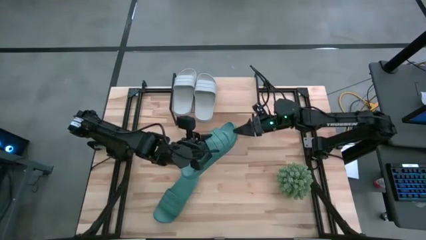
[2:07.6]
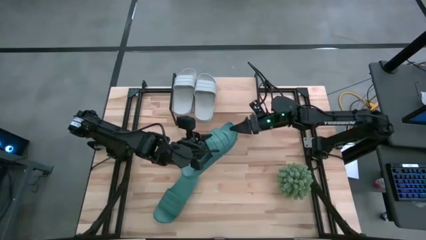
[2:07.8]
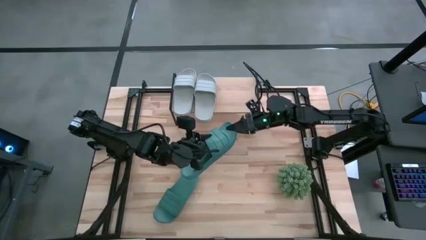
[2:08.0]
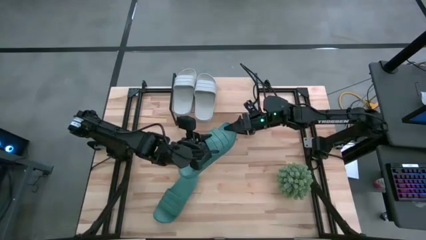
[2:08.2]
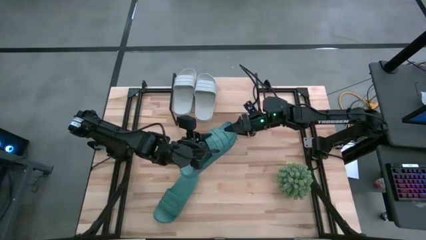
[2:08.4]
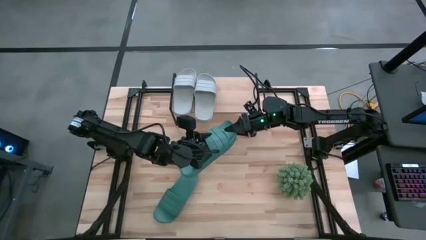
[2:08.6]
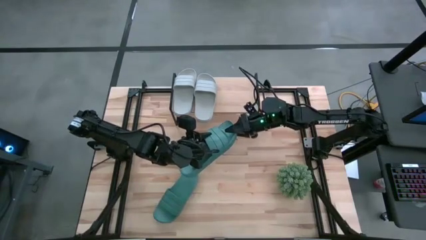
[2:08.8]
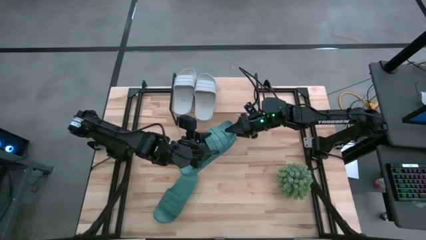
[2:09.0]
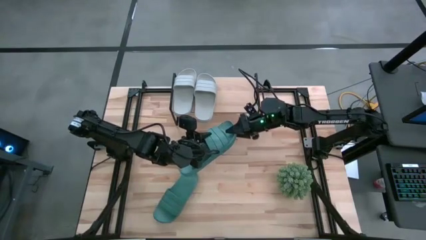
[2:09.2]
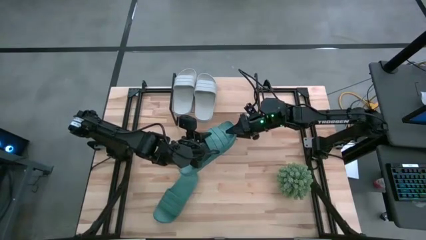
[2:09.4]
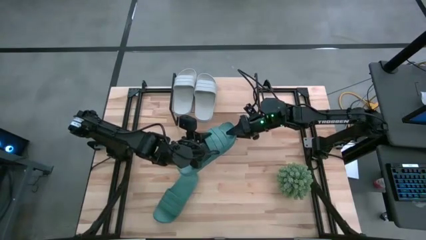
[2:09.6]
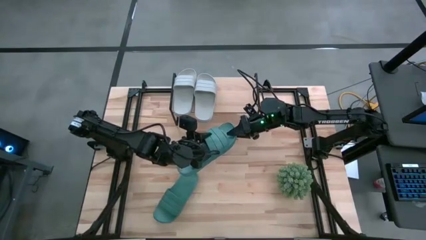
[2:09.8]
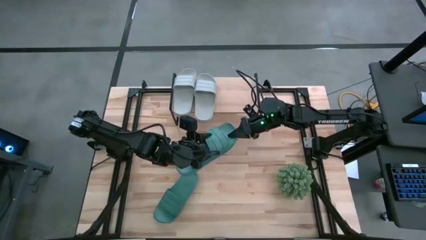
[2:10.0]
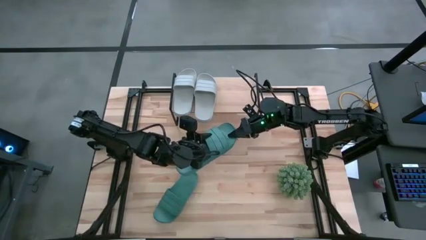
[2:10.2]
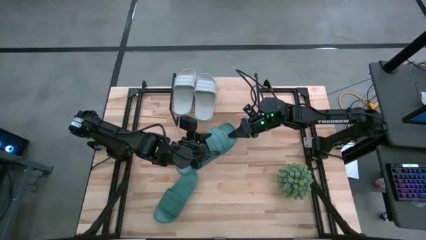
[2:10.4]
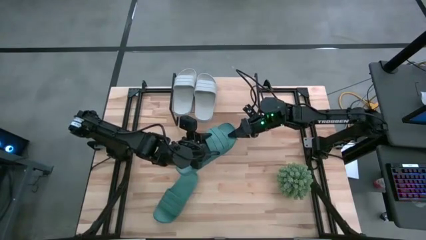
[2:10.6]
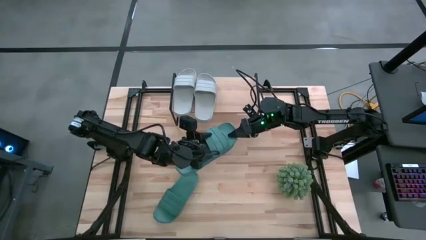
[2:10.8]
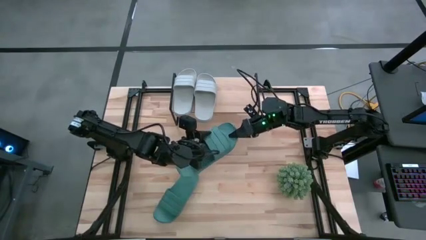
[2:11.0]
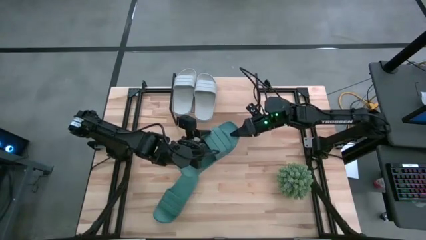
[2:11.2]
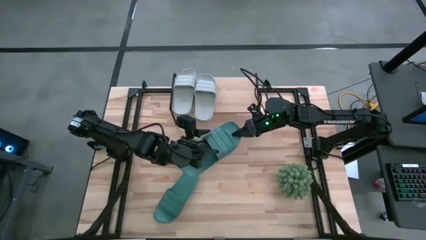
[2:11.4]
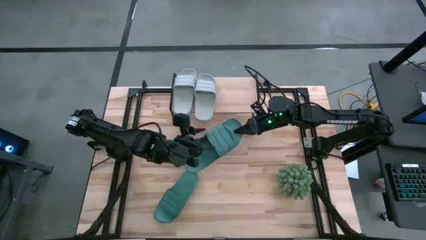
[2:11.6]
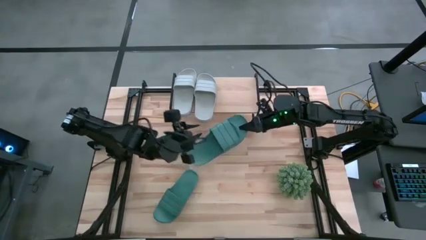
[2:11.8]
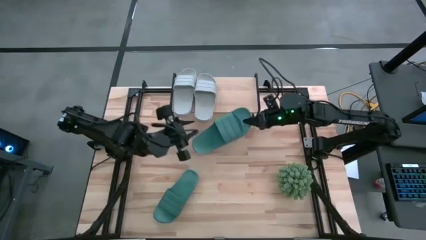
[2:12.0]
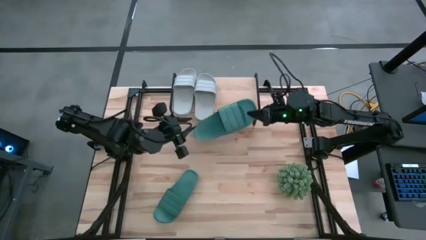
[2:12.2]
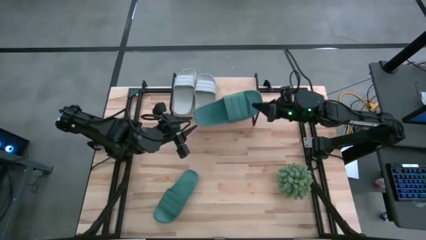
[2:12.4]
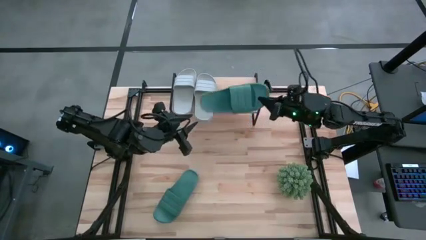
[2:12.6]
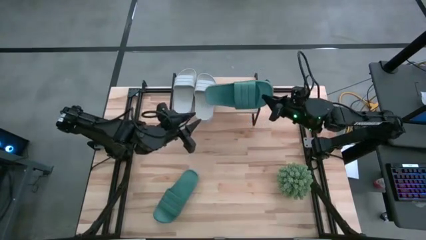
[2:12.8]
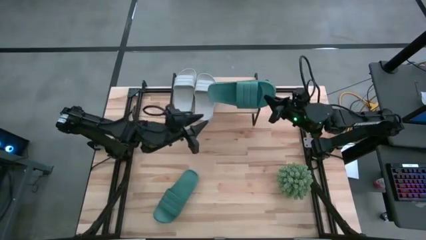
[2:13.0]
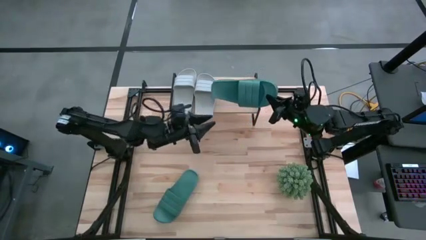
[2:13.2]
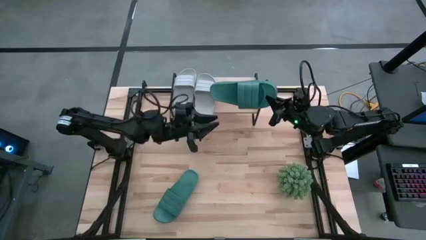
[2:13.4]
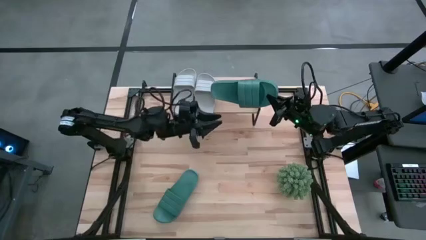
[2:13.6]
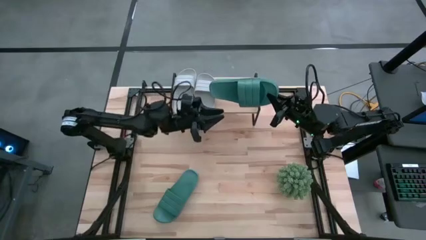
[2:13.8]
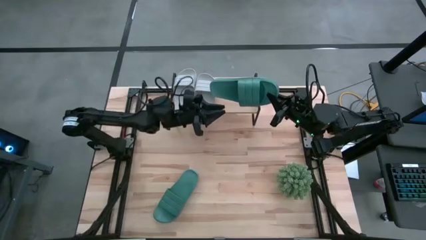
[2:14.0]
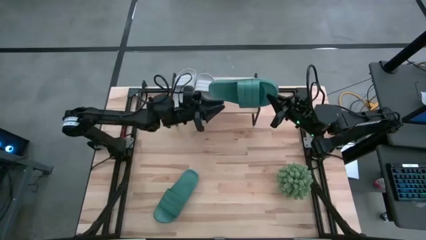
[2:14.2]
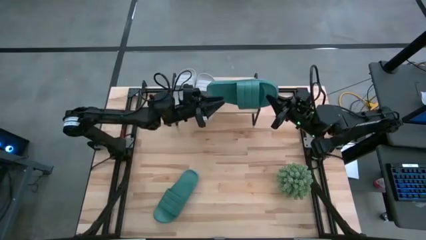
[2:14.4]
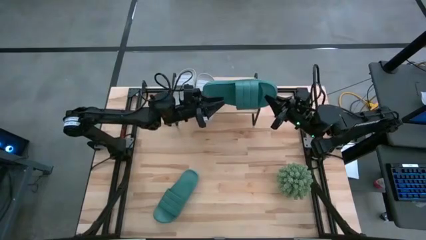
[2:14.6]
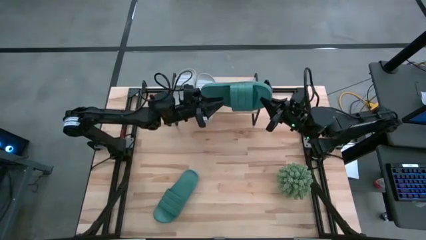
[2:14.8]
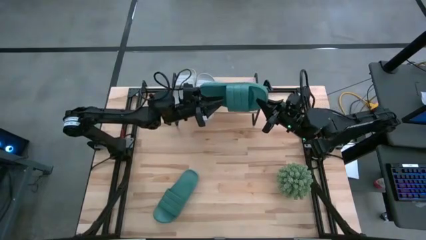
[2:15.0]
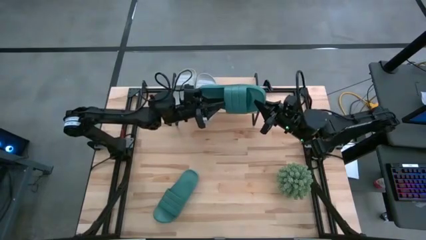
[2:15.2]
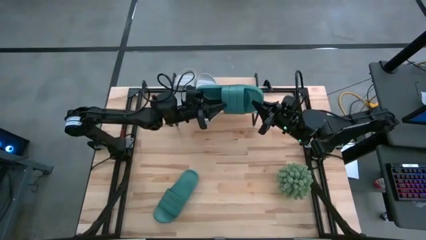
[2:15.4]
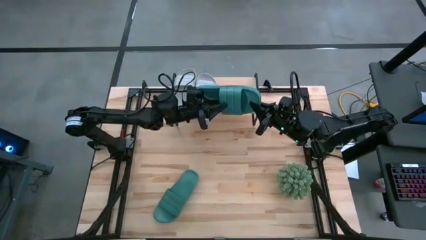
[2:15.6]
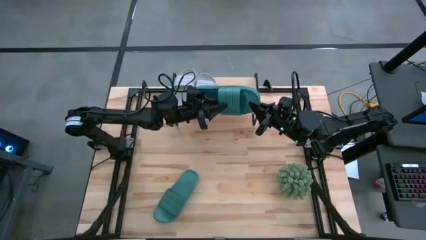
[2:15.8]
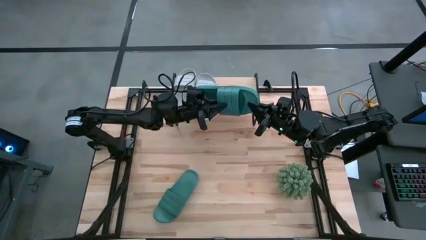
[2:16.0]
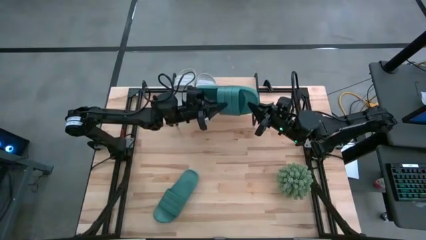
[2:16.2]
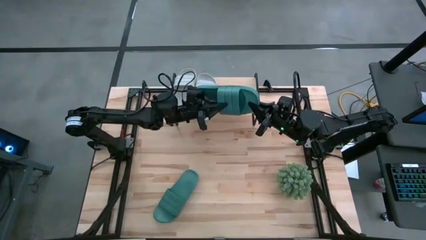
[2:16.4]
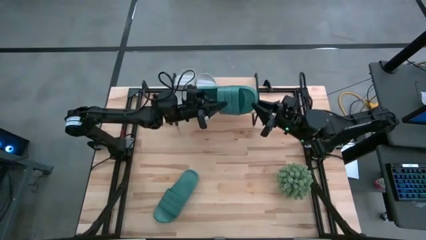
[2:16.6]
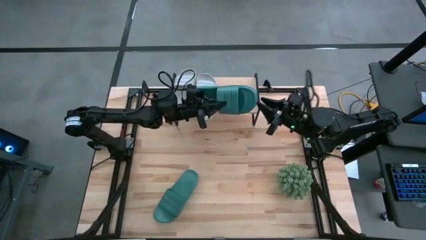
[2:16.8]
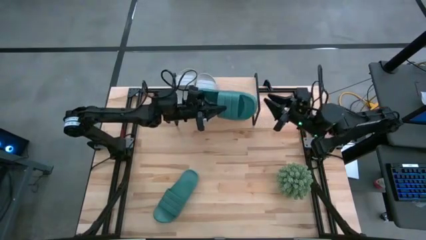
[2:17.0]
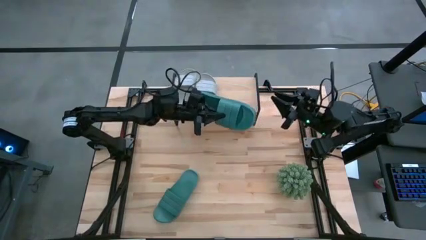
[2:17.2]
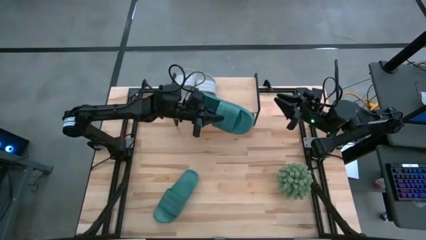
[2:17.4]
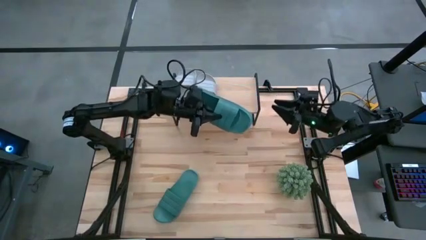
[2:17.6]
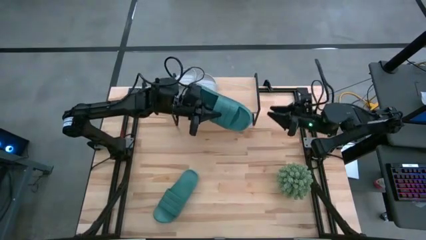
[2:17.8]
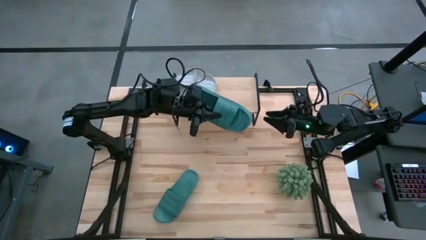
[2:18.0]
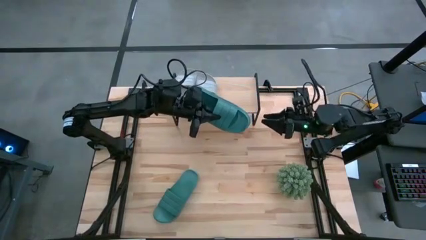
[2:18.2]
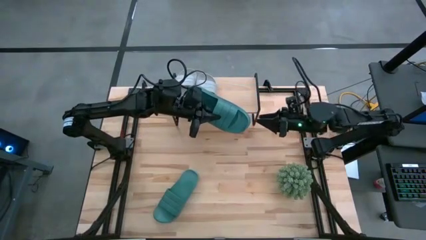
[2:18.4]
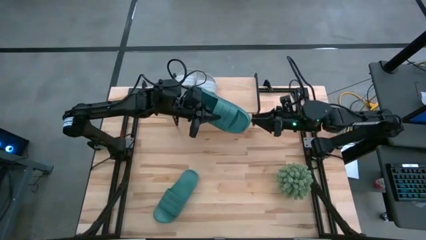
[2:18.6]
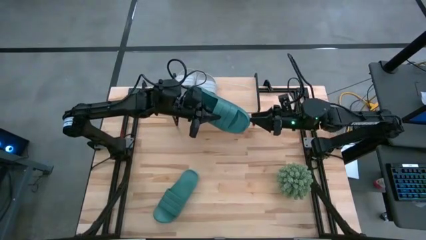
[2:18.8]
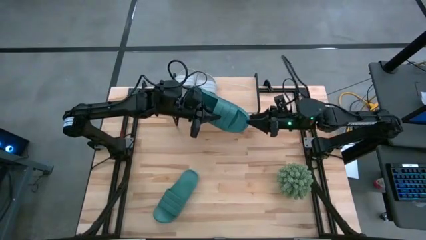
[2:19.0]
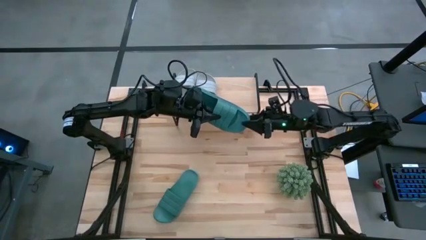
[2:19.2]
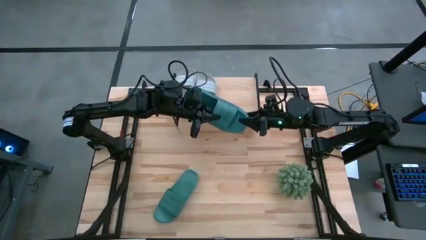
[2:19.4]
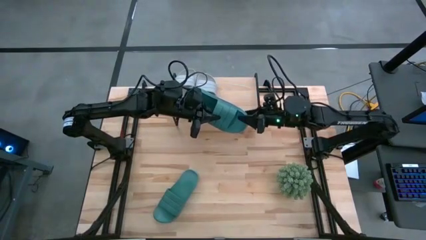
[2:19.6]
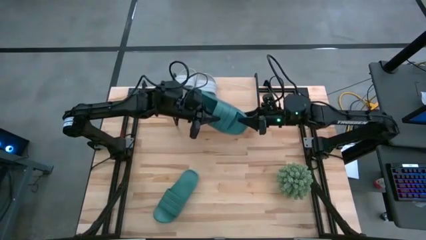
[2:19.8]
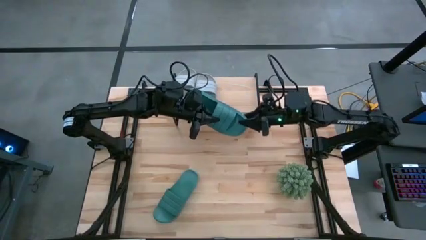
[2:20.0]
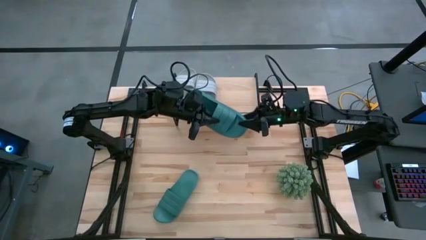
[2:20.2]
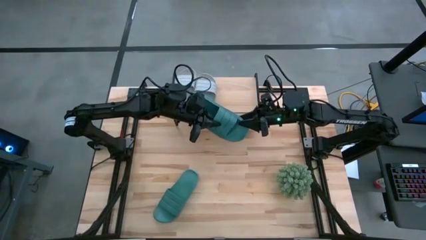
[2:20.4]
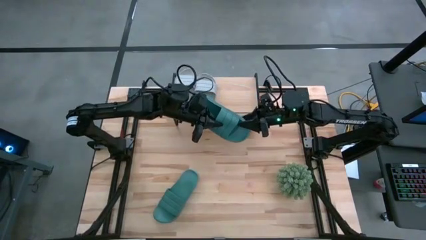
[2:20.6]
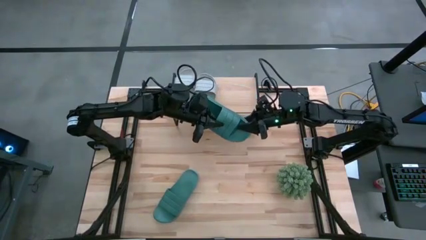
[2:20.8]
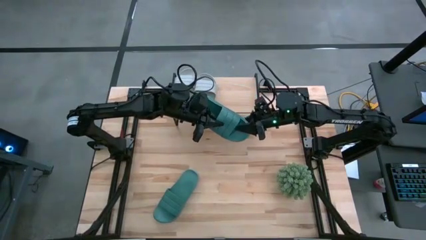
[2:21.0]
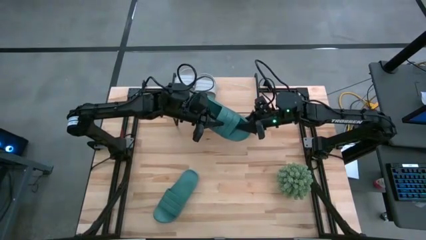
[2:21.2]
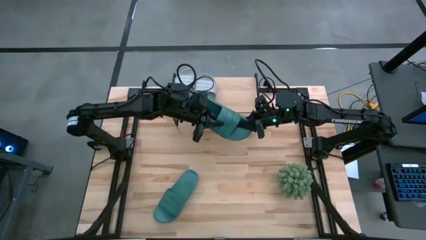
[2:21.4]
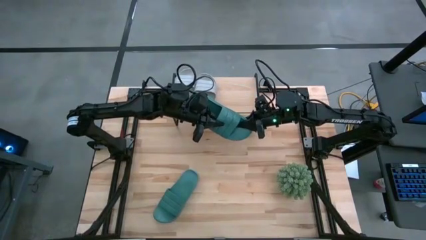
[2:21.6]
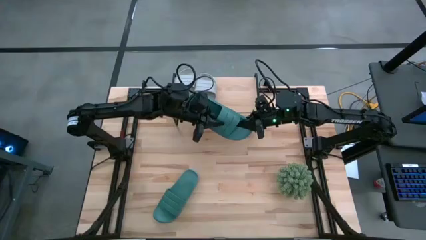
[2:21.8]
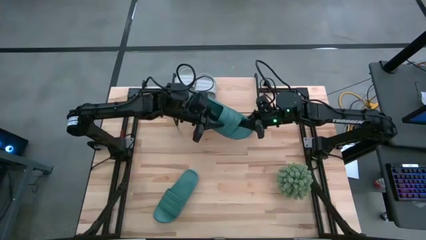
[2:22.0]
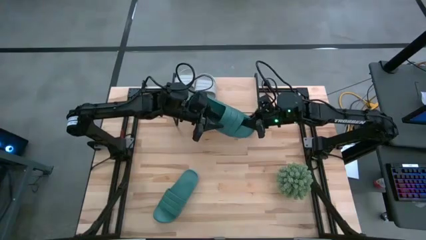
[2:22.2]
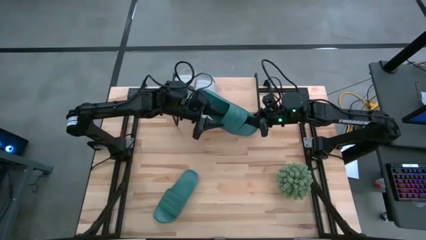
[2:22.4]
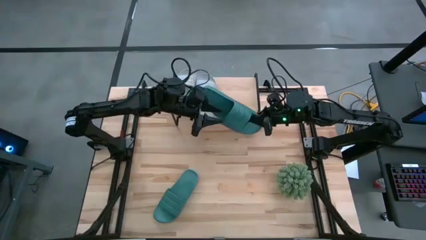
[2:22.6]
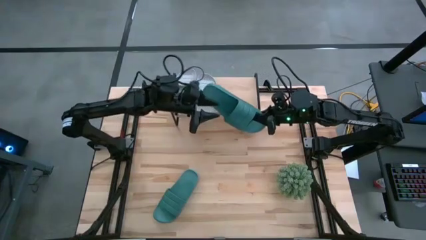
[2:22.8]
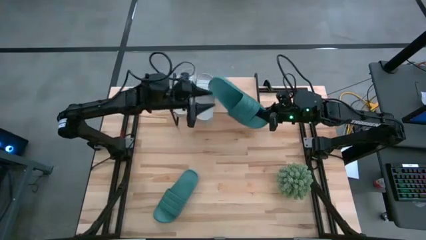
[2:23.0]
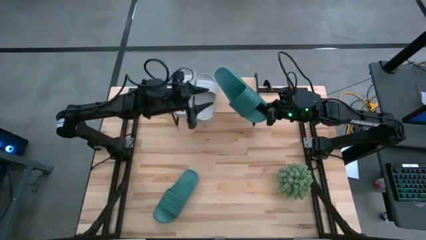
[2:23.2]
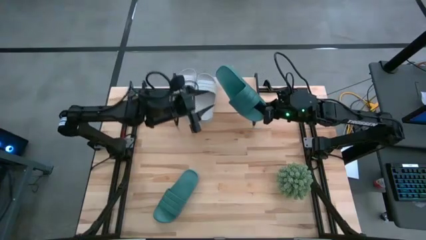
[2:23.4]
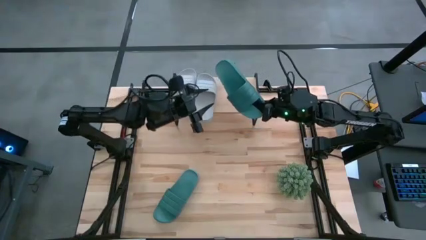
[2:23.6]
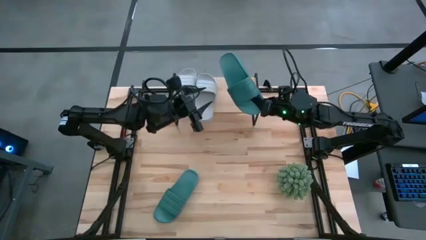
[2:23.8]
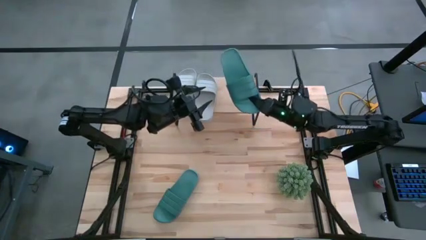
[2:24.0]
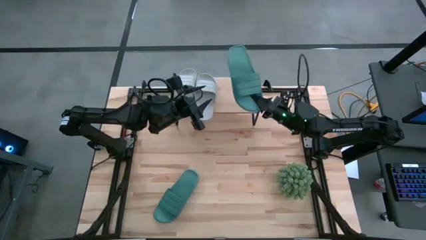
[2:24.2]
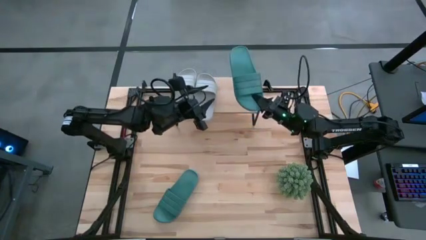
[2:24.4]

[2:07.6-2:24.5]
Task: Pick and place slides into the shelf
Put the left green slide on the shelf
